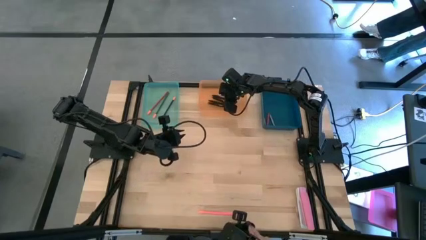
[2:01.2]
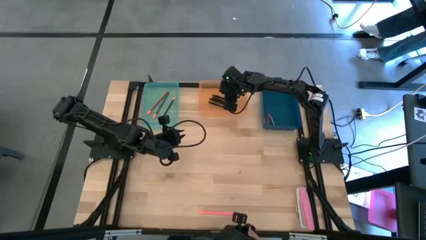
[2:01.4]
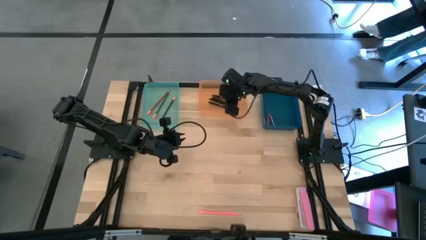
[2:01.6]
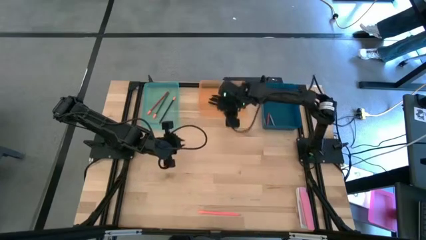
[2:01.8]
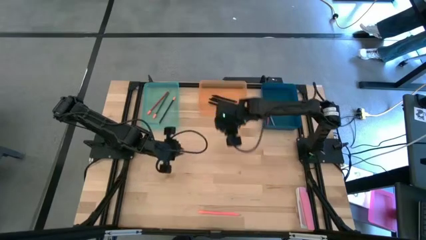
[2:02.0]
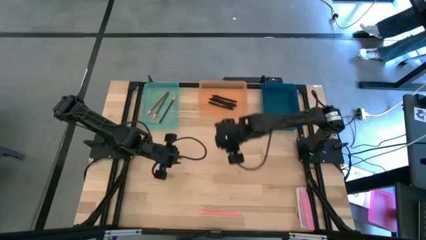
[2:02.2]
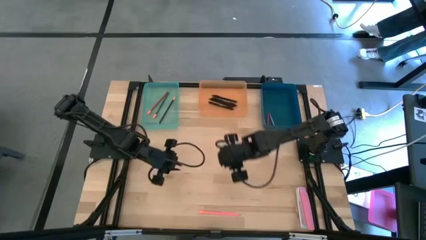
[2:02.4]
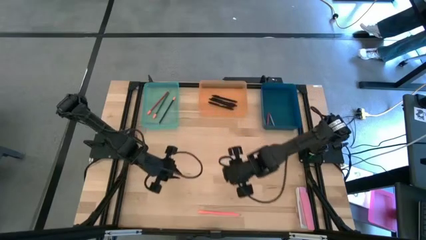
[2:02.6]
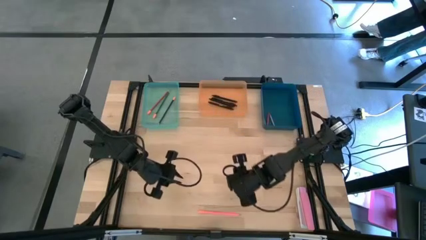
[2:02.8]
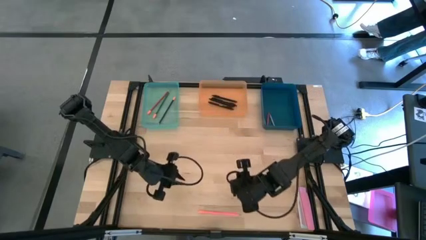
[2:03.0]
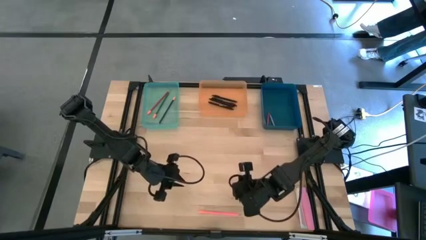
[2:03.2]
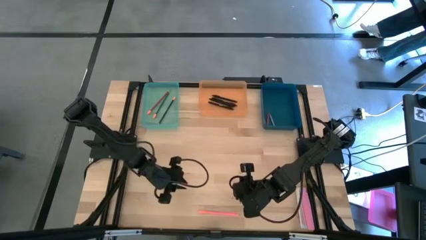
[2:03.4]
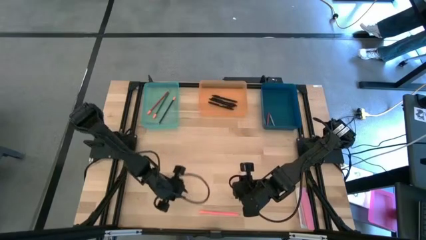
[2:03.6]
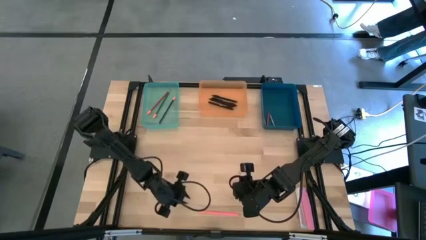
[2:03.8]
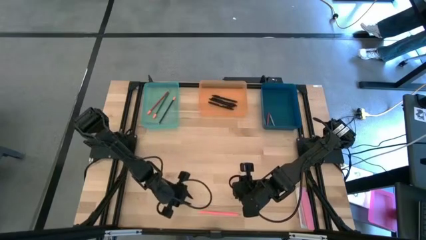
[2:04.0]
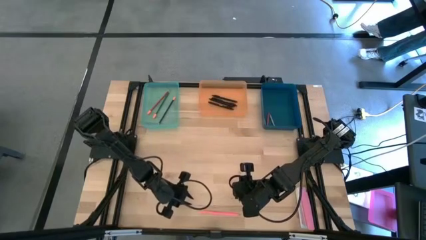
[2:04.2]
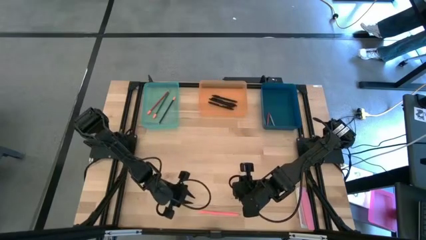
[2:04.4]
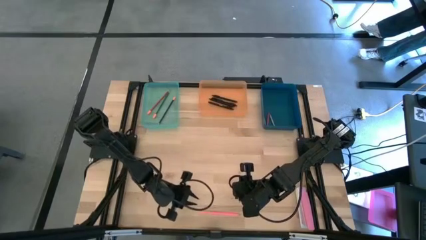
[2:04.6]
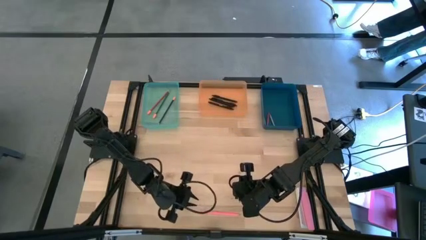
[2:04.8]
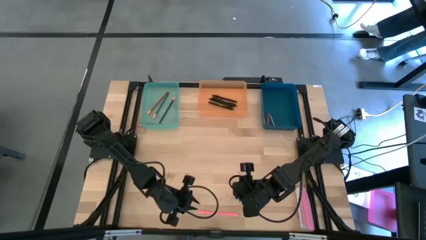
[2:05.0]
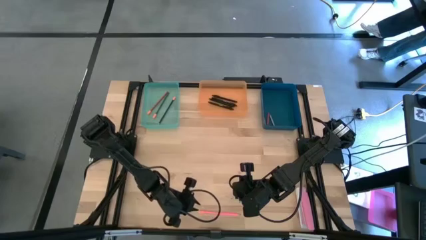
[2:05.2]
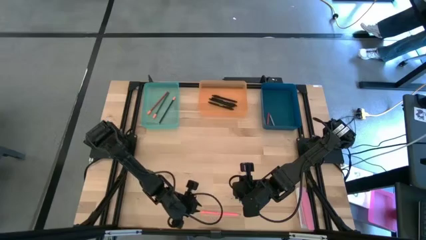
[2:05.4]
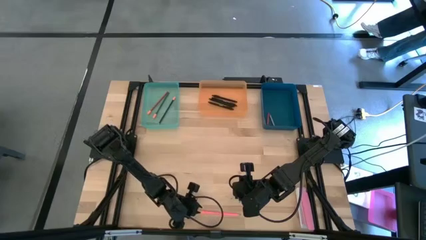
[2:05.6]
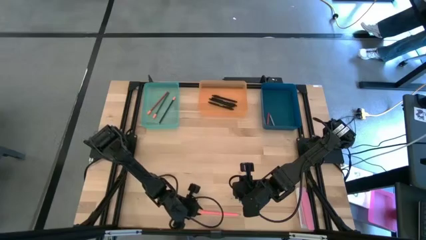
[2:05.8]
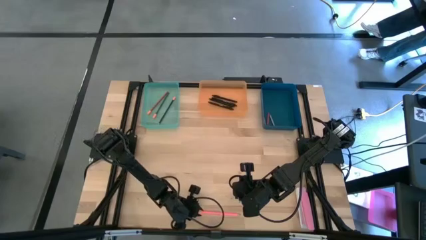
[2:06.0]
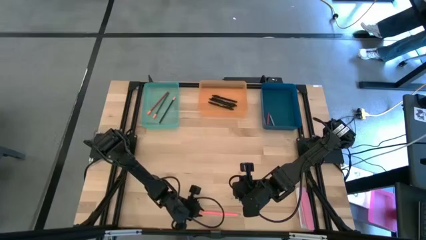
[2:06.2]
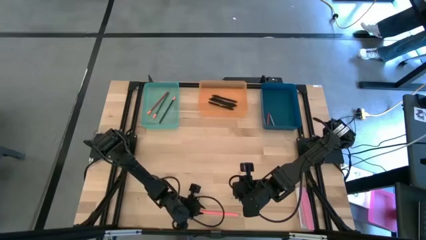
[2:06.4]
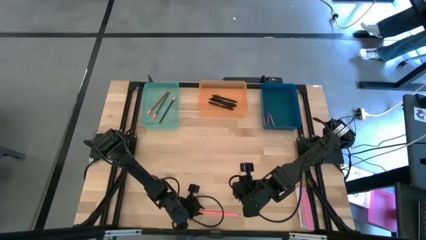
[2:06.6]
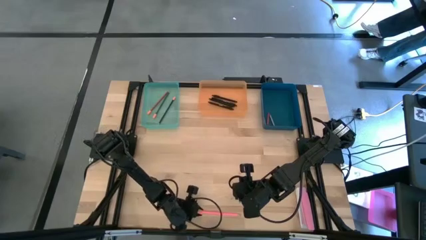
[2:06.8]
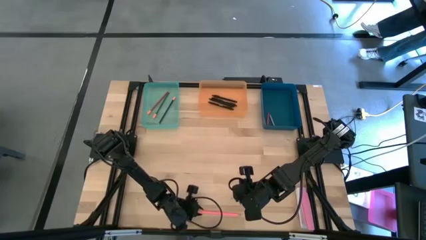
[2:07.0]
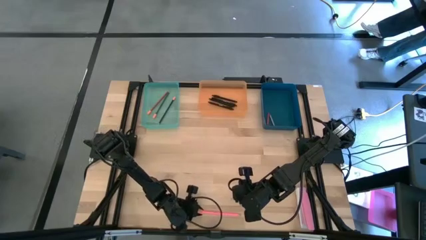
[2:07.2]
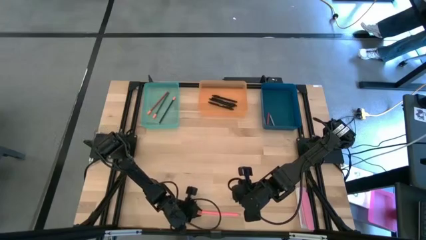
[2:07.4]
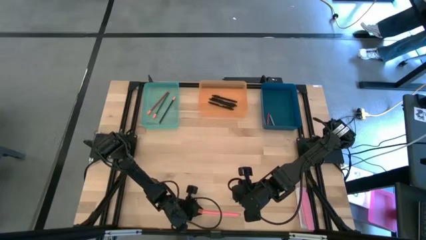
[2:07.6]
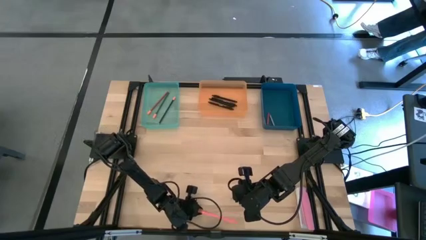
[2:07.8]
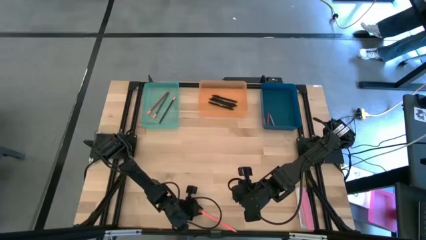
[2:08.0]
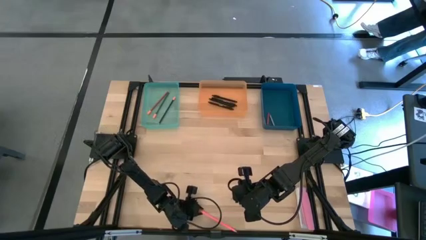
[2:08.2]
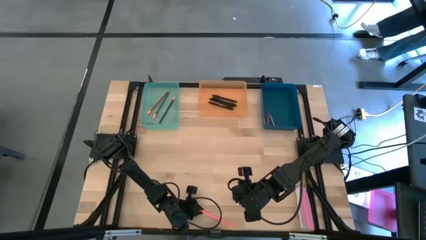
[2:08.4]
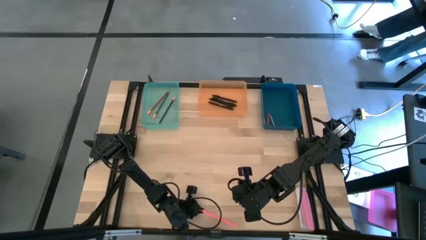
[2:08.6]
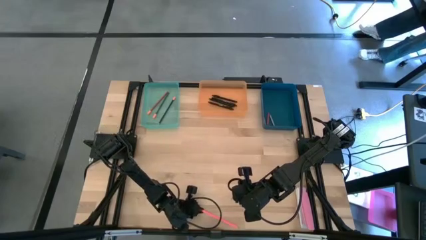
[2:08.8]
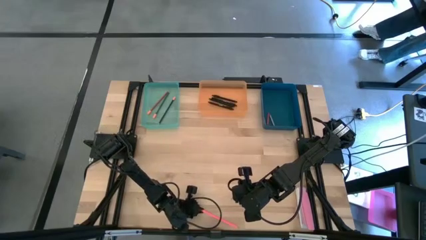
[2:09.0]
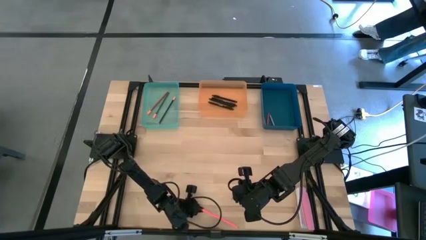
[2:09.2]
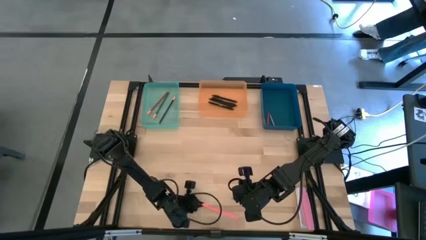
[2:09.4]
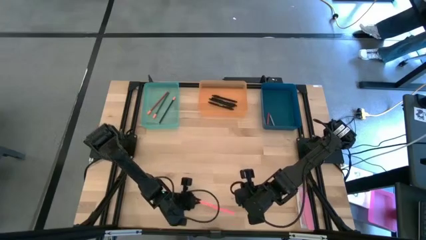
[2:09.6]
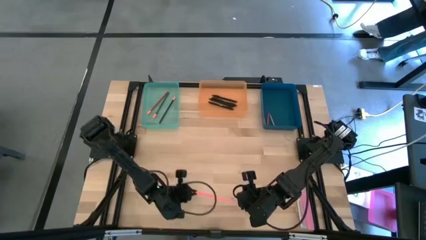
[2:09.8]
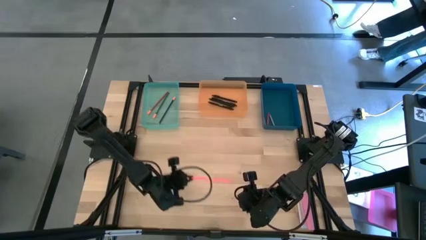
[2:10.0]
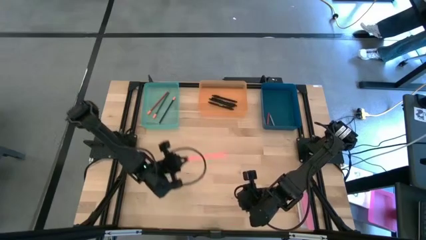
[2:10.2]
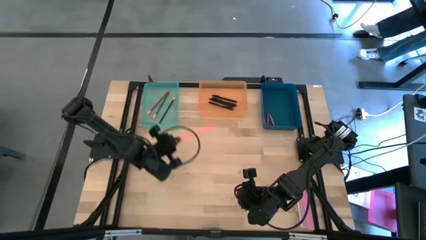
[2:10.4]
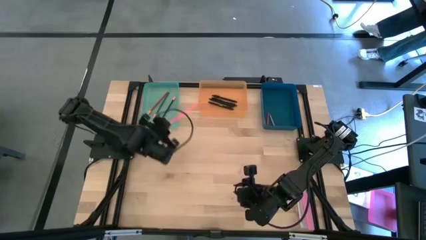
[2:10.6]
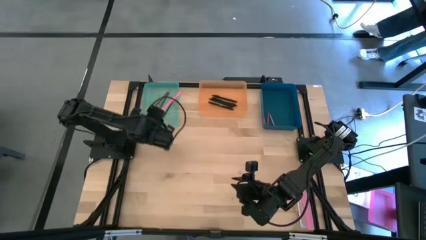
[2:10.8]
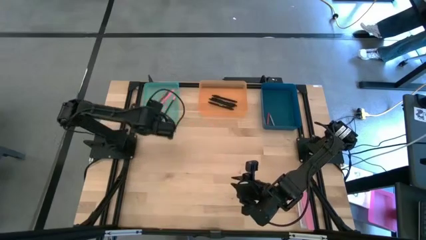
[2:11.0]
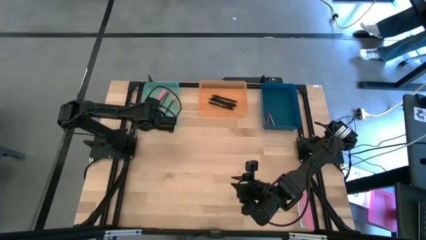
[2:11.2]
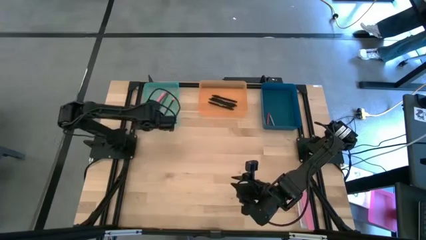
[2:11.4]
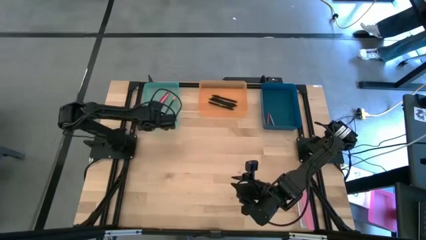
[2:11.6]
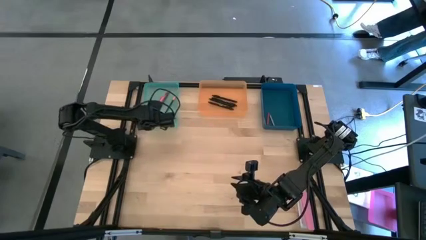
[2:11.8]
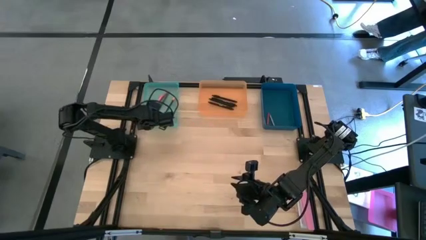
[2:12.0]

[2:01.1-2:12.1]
Task: Sort crayons/erasers/pens/pencils in bins
Put the pink pencil into the light blue bin

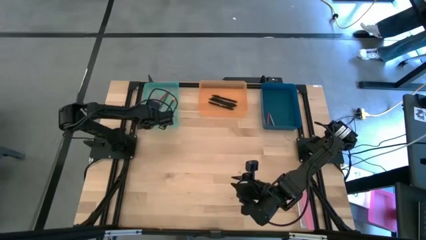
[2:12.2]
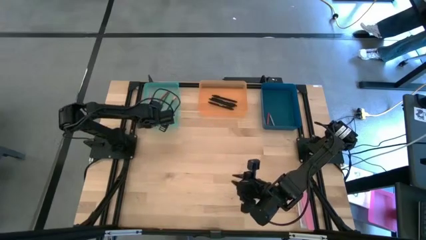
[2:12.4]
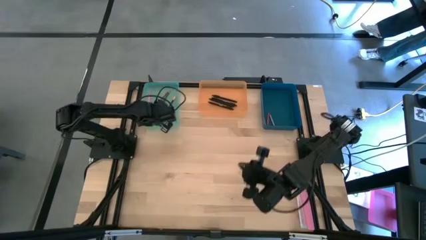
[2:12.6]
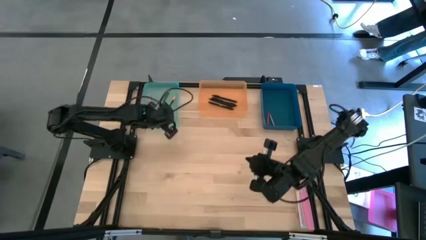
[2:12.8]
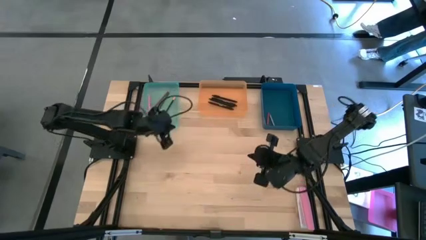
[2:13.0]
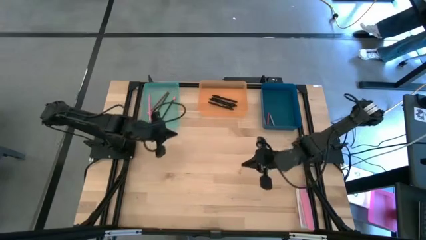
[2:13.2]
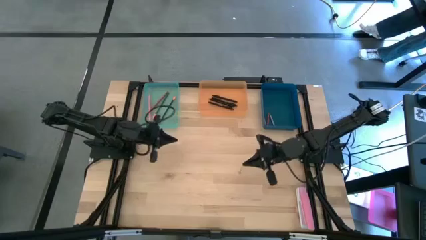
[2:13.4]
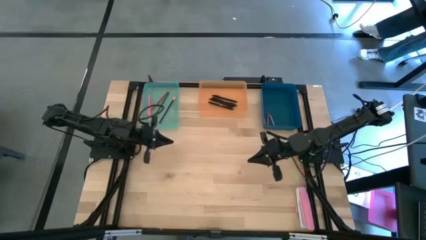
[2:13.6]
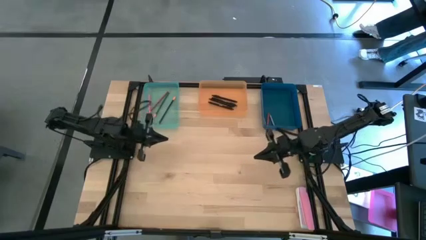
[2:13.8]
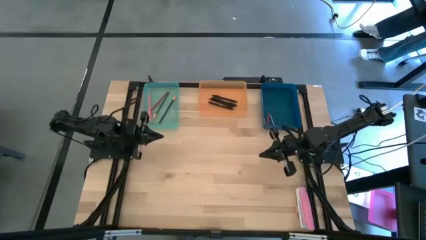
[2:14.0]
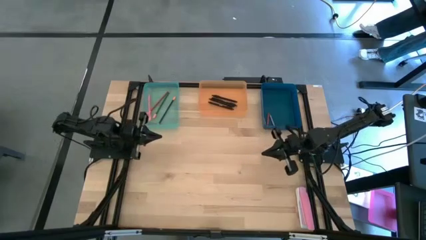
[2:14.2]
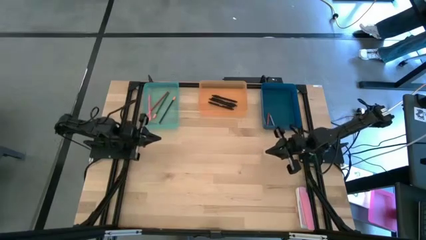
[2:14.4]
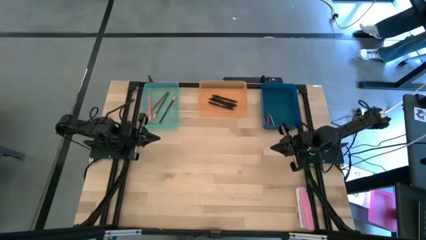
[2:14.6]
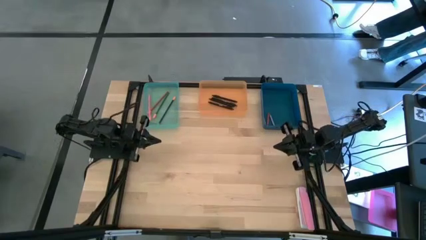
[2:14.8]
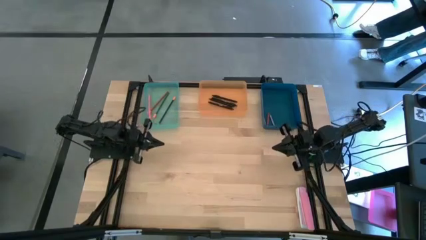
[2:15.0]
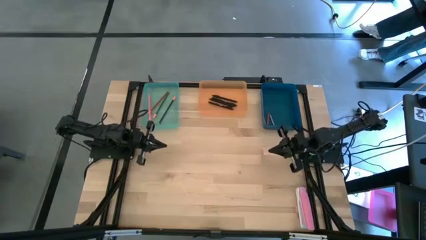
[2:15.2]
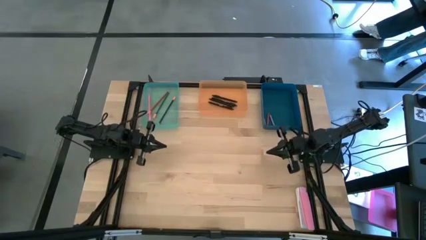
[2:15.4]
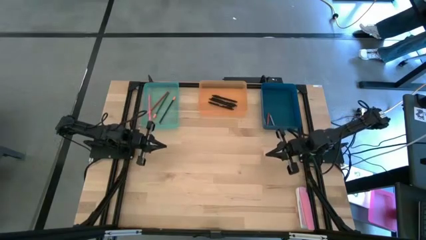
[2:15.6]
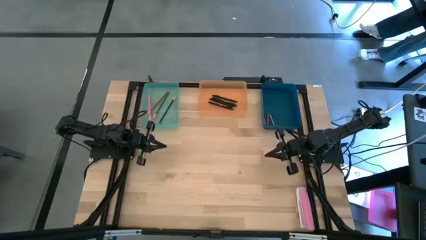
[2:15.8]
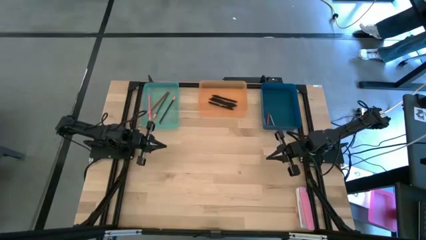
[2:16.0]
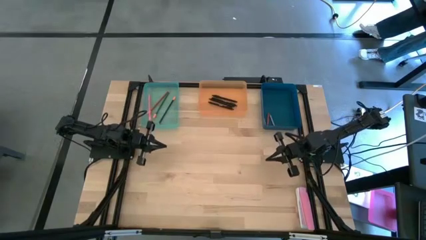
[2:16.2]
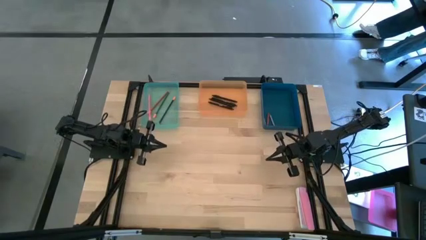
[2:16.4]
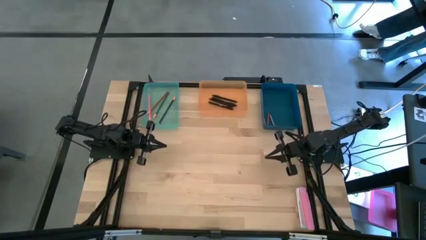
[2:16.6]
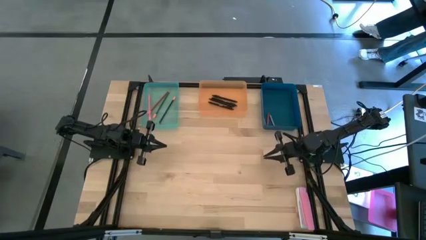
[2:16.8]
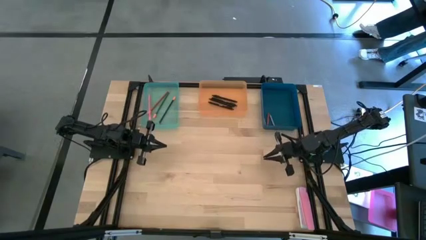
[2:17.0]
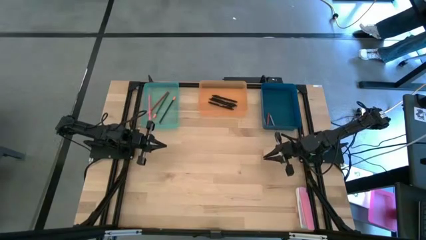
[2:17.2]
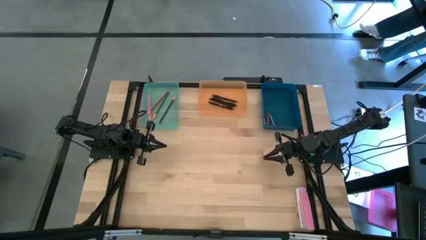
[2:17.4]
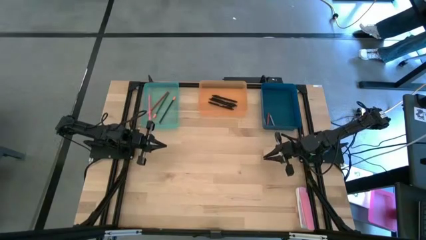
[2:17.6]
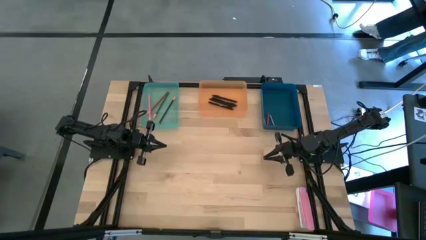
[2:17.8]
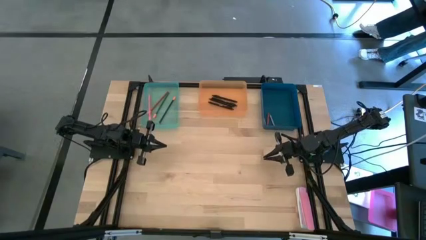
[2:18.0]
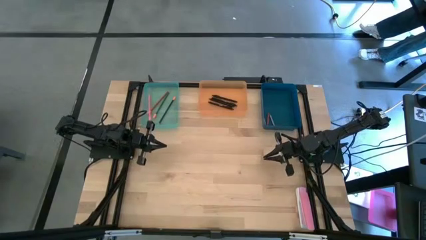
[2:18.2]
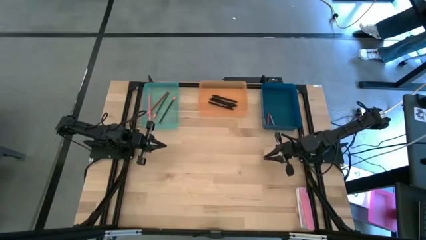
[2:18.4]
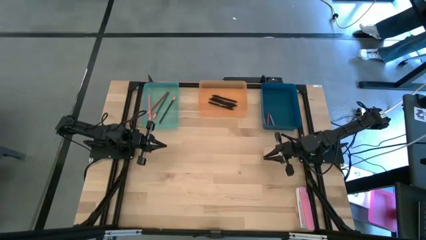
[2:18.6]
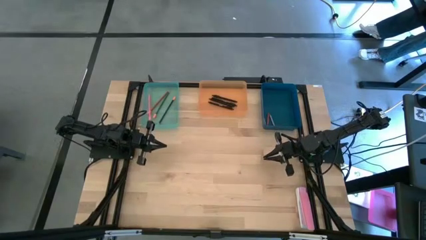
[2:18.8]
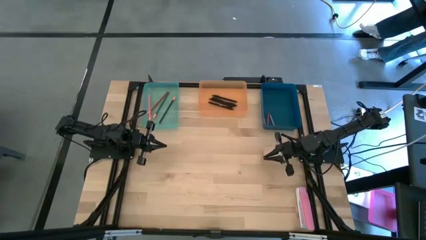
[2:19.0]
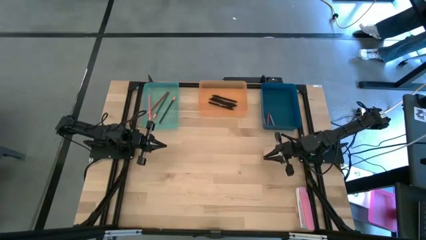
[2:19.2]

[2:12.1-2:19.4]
Return to Home Position
